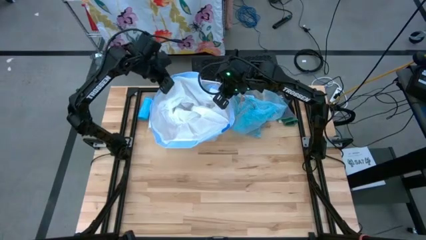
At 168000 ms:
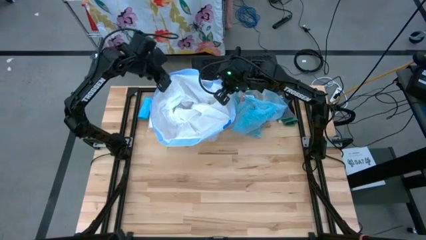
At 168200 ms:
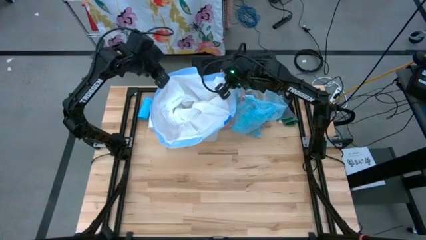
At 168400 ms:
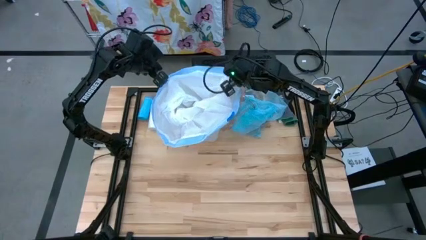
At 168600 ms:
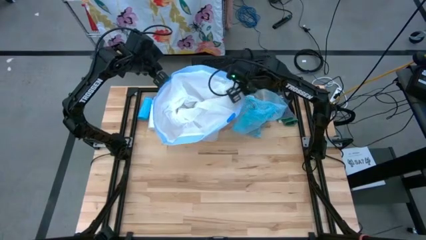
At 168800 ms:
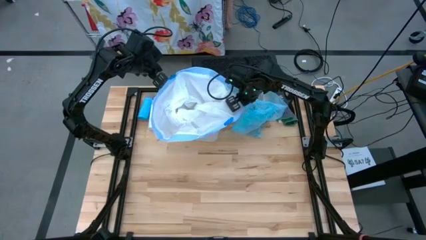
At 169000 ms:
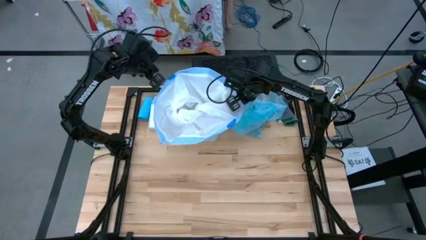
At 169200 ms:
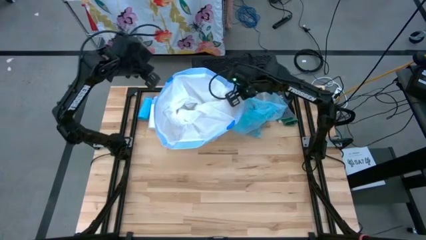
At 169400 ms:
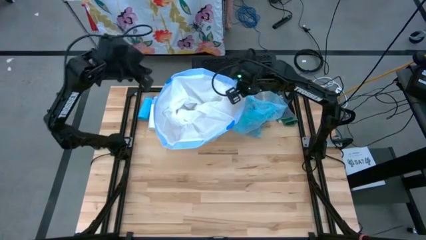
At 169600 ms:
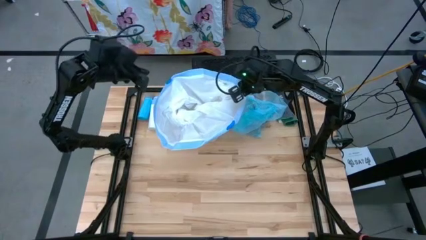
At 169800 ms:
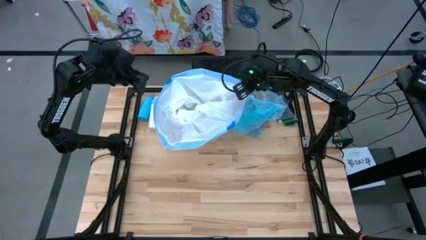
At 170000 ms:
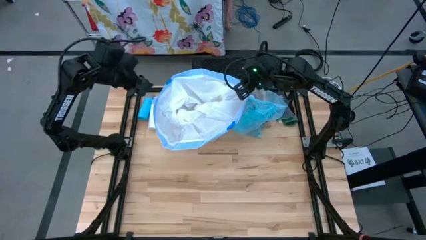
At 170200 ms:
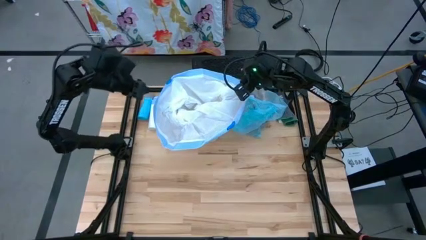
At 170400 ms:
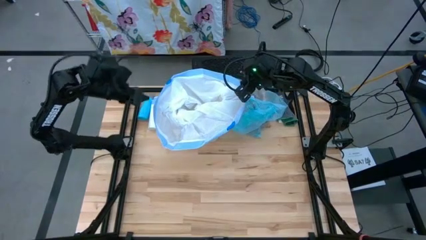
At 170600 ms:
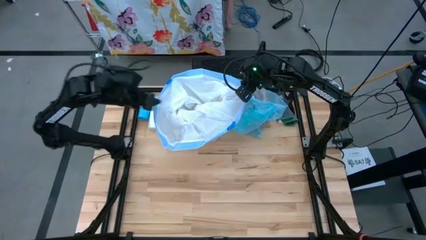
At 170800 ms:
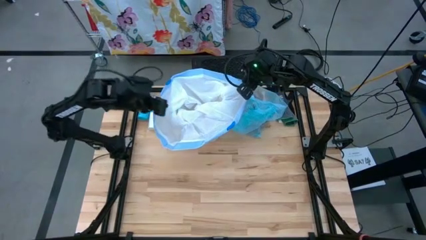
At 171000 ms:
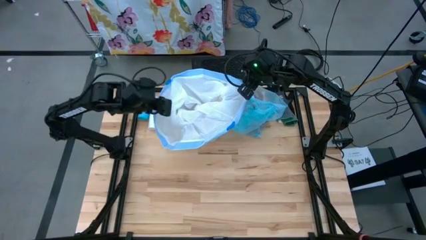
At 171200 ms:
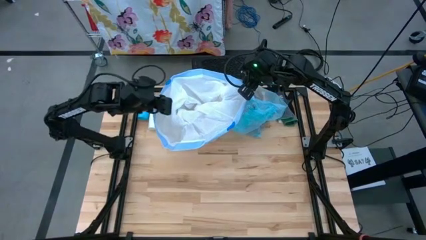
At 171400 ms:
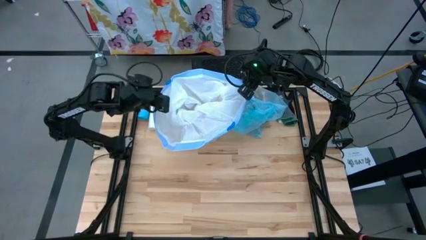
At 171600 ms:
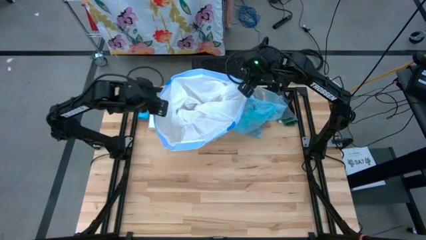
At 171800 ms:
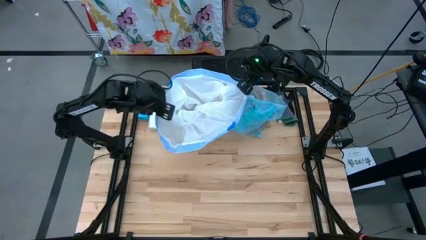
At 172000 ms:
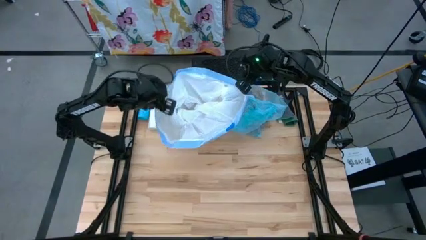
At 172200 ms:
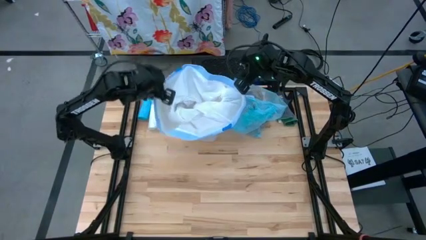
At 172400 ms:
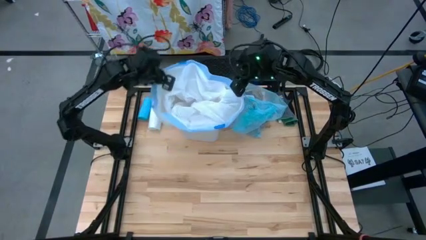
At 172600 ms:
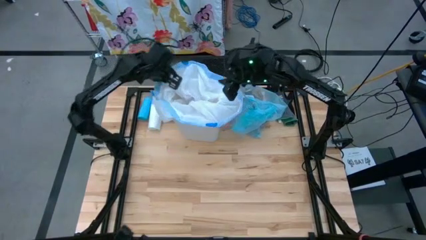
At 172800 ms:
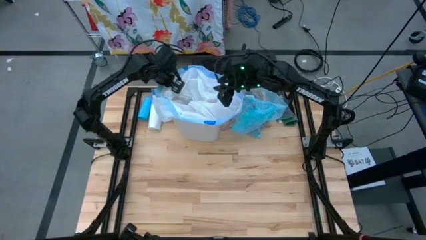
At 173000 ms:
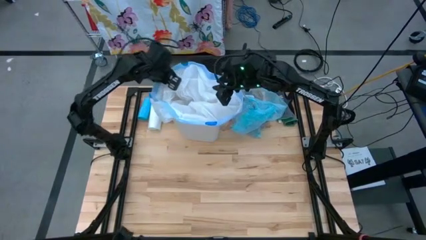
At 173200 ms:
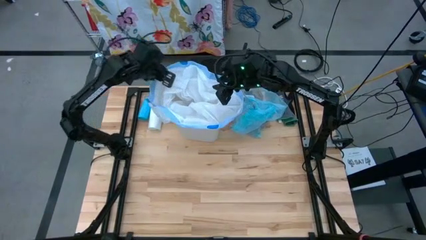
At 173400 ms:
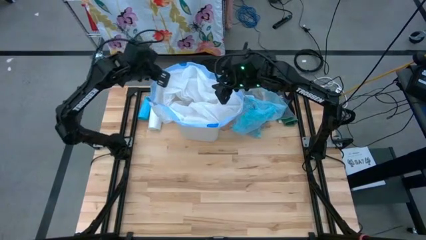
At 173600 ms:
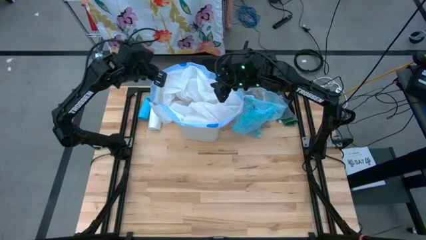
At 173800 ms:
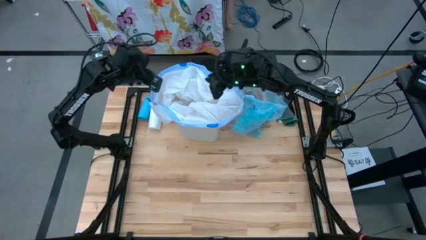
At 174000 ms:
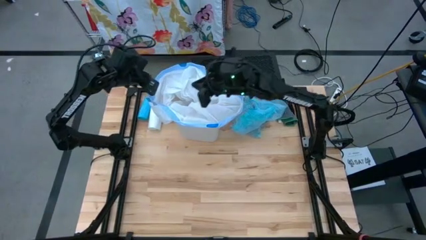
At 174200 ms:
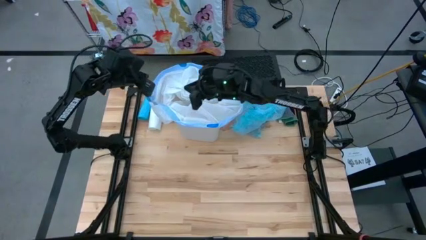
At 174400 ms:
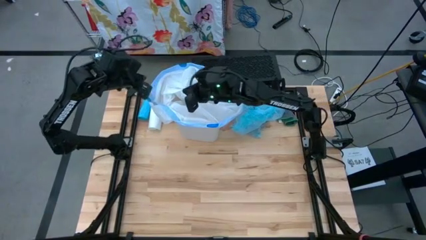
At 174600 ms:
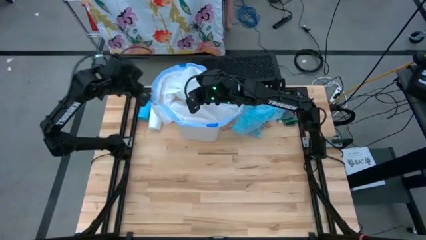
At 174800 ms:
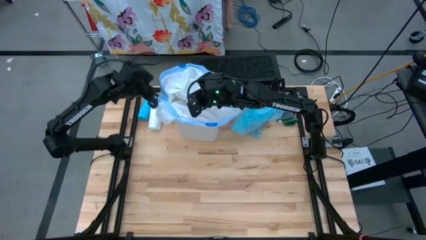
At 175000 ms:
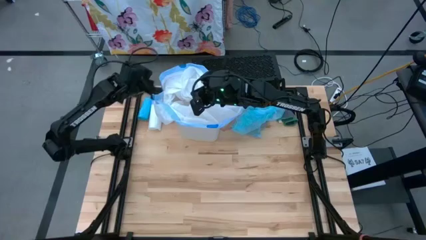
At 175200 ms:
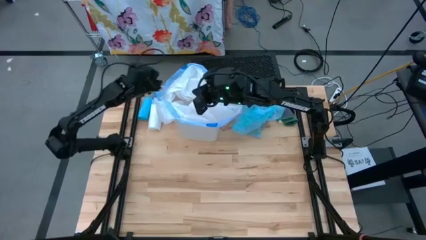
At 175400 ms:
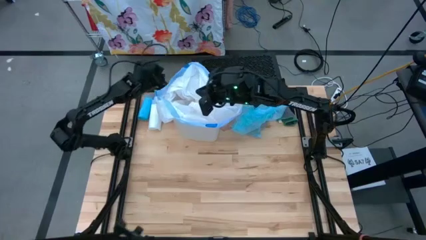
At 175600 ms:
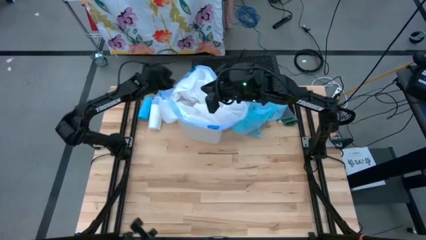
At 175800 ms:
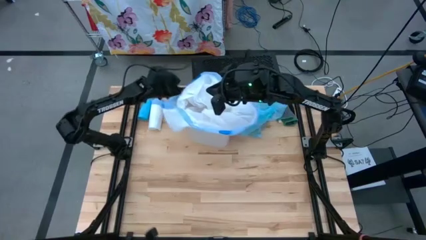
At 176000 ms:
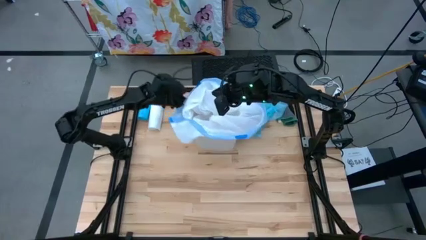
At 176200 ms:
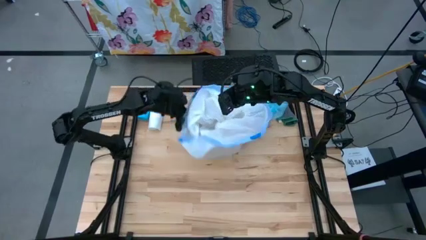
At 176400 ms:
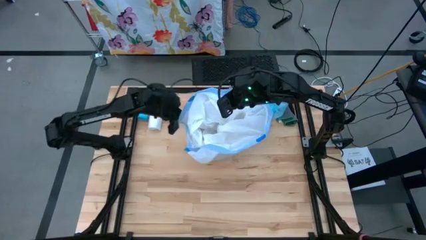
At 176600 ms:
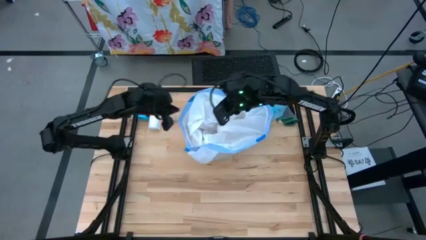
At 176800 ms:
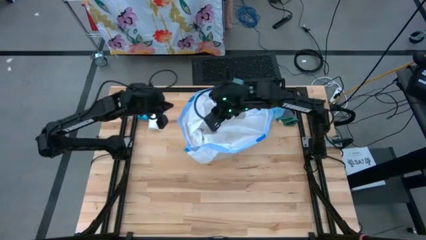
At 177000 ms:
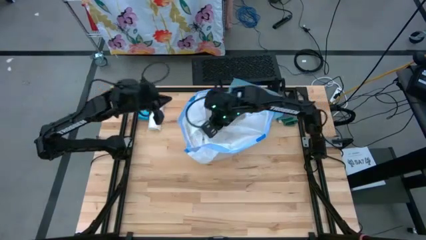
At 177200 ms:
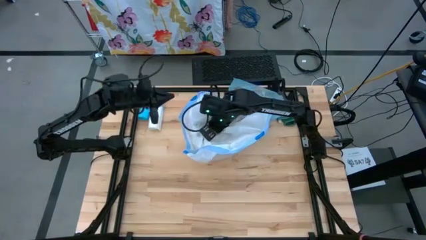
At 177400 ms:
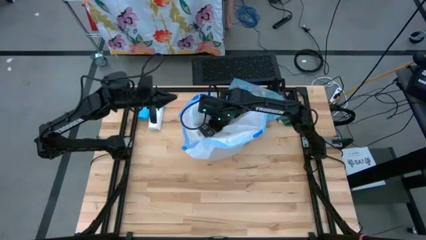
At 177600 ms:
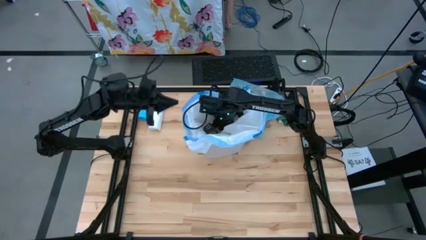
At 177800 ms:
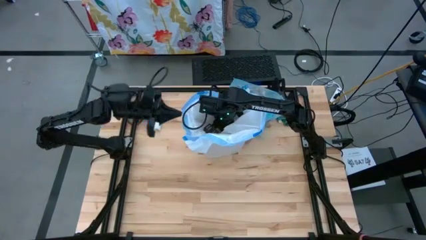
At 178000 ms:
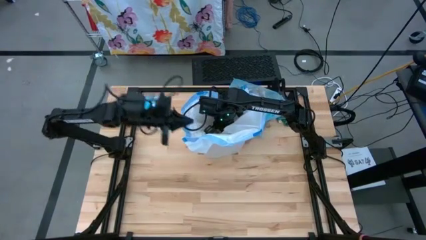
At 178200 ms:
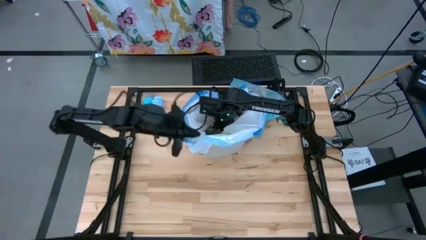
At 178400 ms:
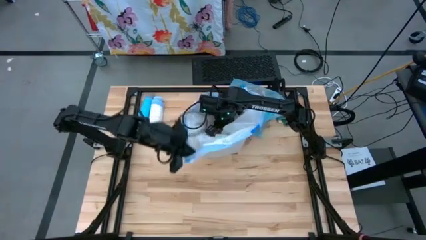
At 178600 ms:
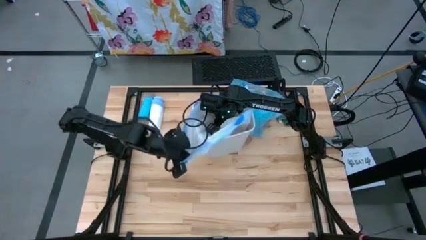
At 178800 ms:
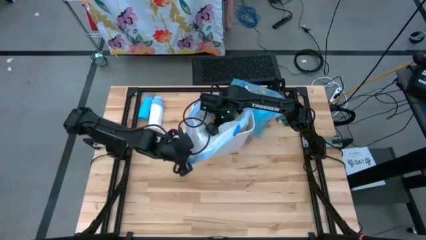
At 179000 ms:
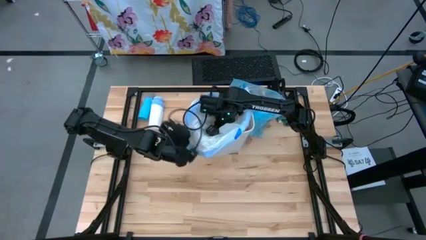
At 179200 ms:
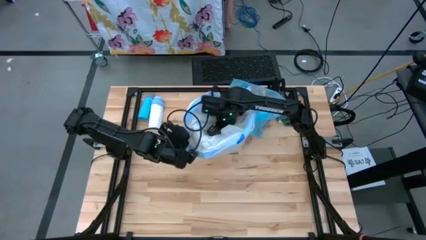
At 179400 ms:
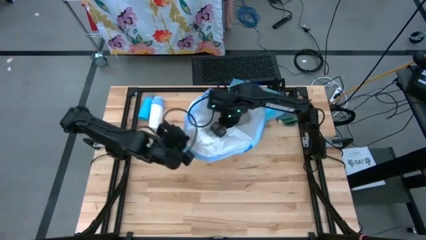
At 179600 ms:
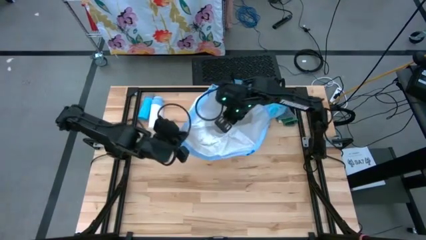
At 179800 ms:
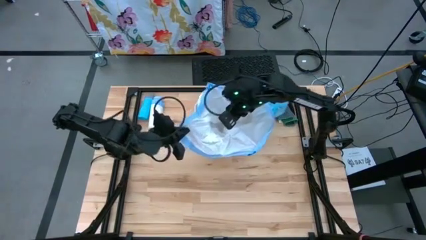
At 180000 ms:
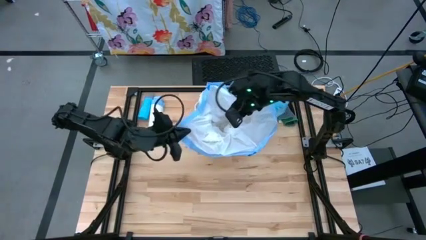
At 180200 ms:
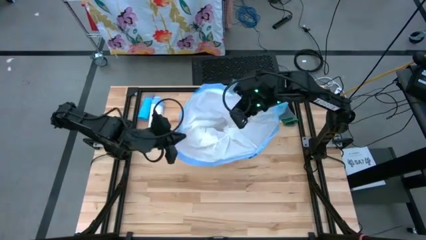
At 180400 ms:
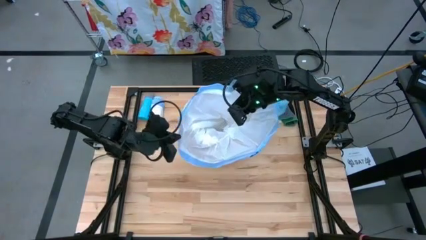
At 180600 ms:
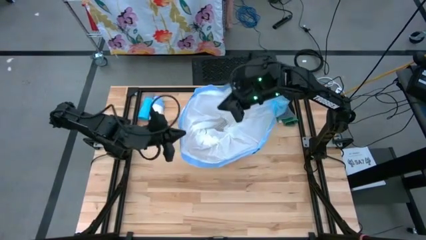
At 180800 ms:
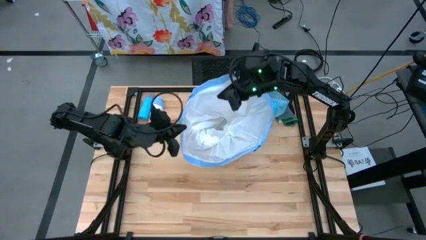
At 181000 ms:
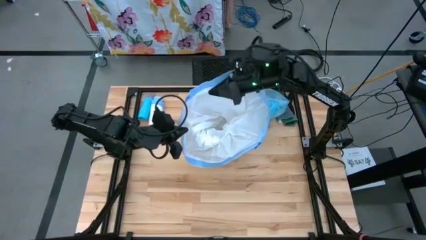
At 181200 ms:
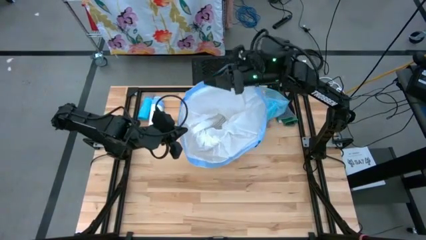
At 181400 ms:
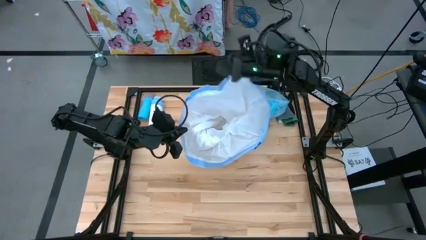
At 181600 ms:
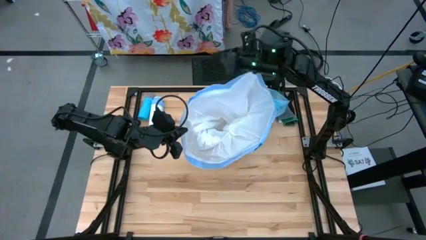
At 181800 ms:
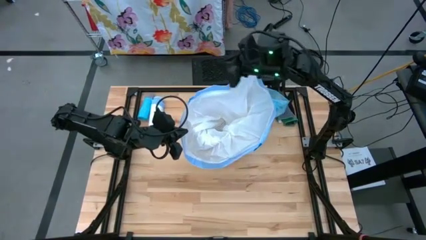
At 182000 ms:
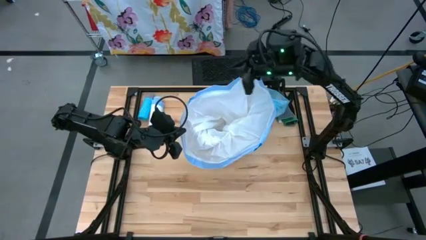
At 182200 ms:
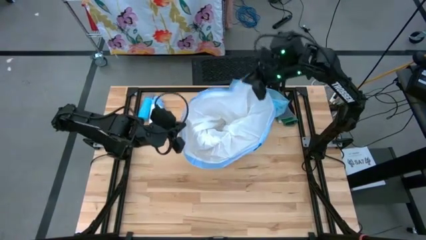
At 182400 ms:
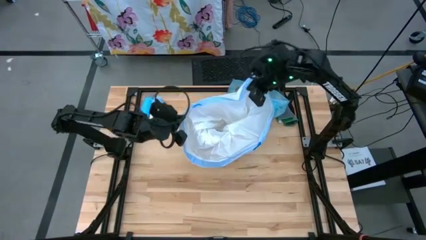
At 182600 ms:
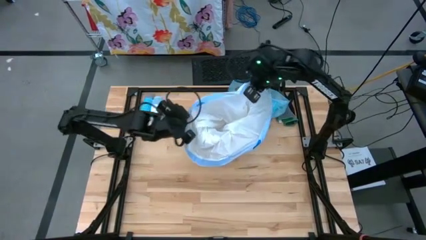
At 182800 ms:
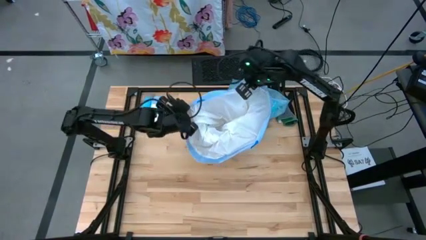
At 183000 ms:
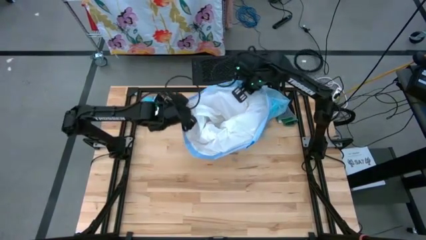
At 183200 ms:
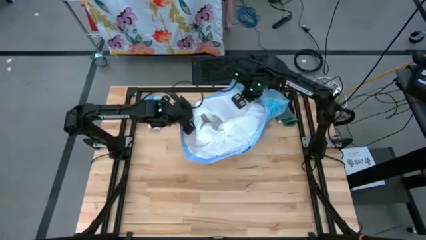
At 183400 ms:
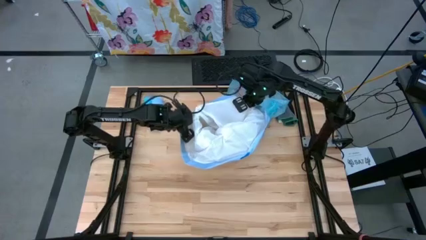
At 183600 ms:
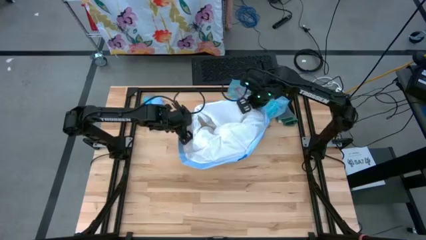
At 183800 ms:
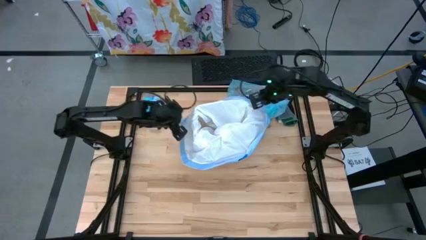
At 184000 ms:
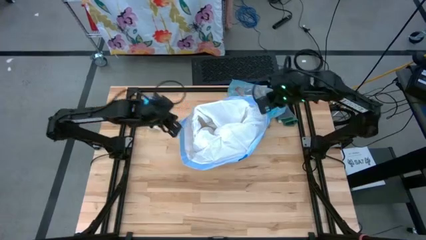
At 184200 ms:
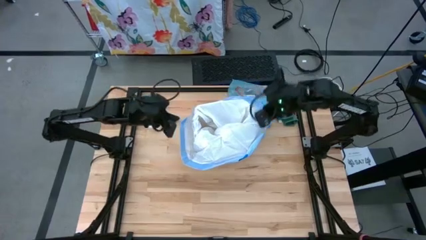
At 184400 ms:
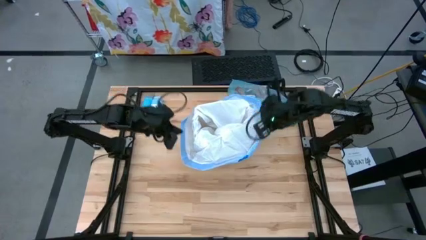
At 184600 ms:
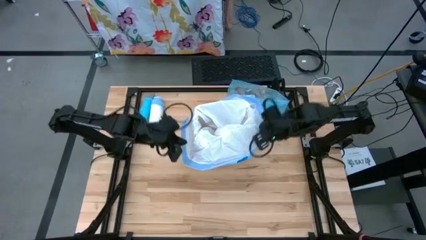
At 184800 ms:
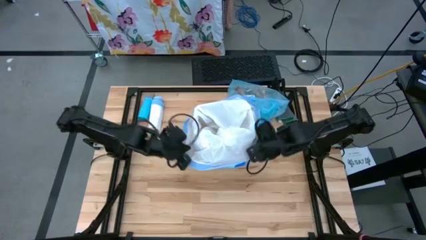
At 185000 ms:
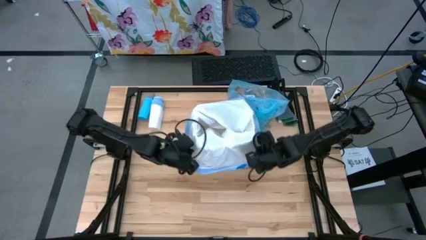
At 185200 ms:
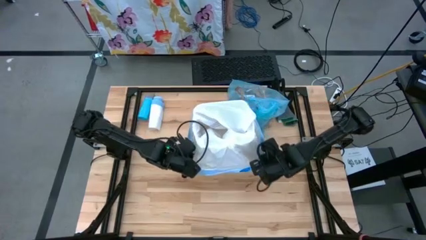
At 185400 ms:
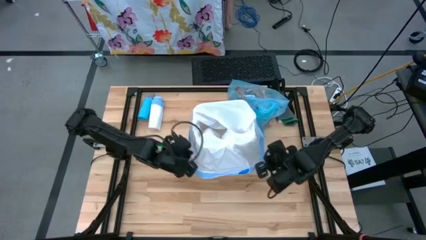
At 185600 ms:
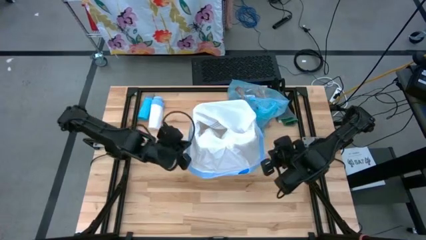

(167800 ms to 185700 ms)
Task: place trash/remove bag and relplace
Put the white trash bag into the white trash bin
